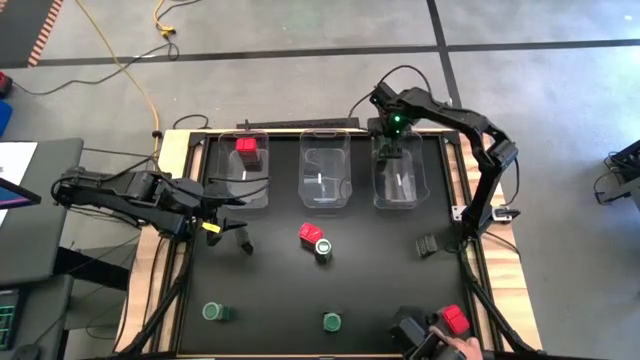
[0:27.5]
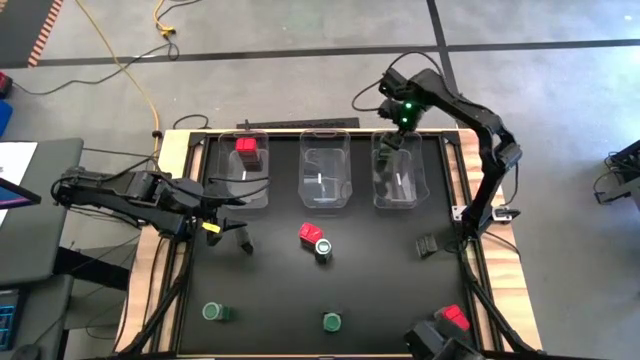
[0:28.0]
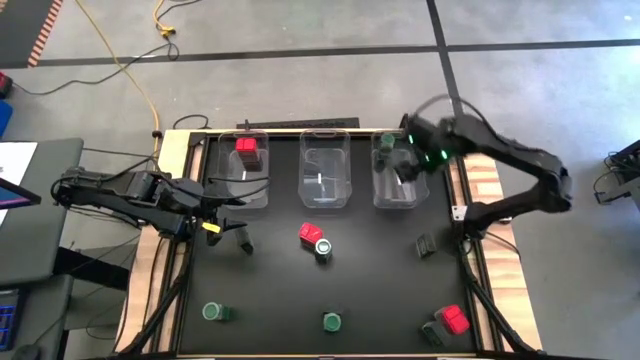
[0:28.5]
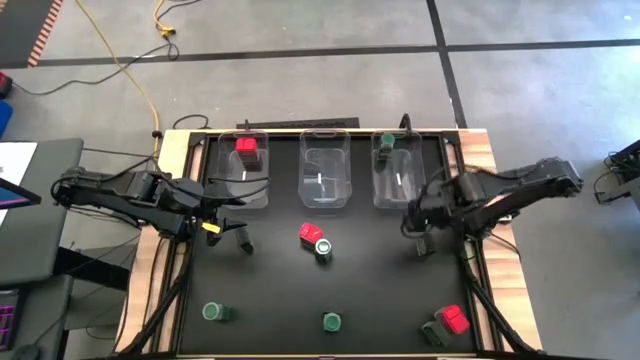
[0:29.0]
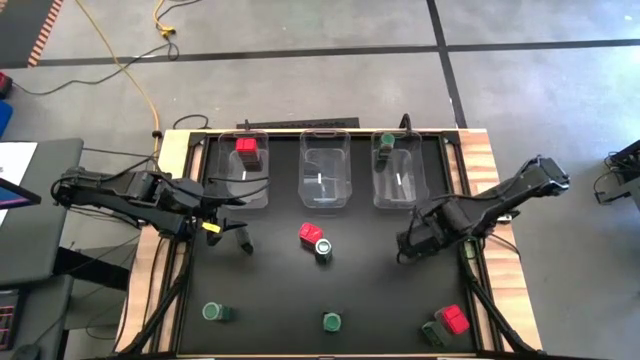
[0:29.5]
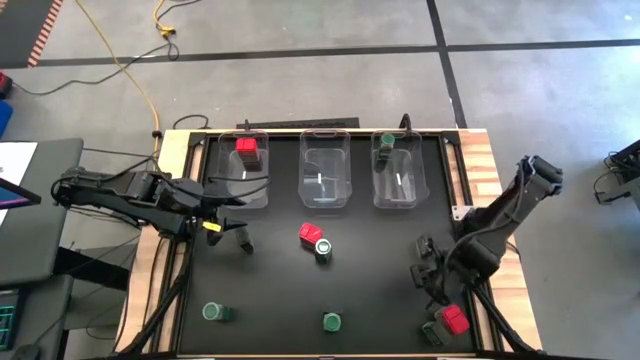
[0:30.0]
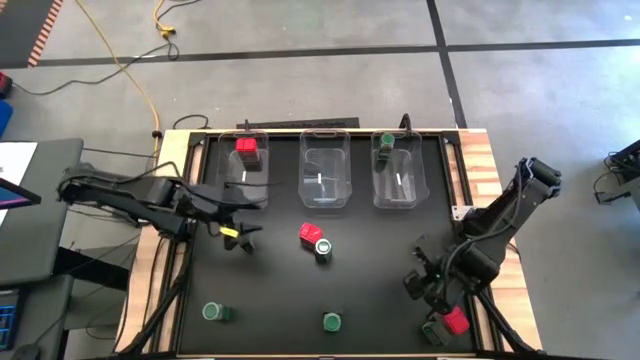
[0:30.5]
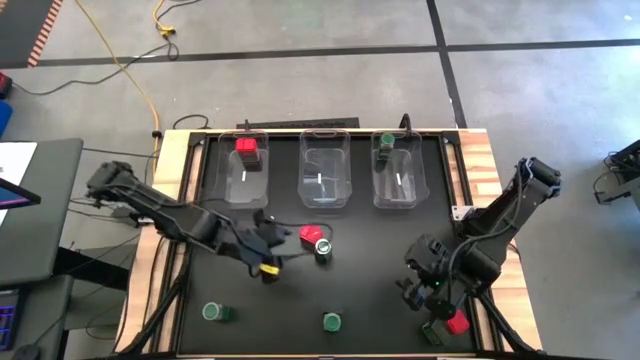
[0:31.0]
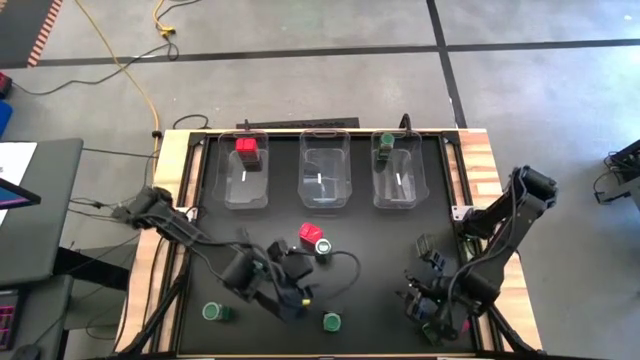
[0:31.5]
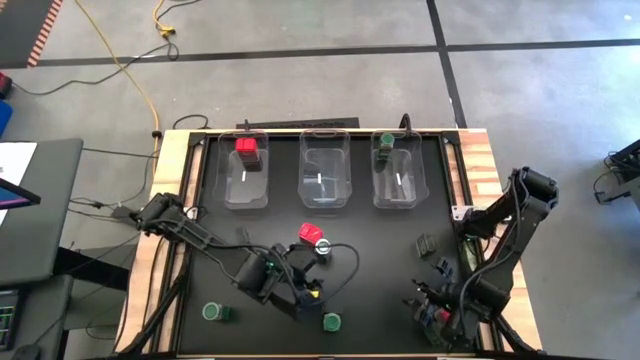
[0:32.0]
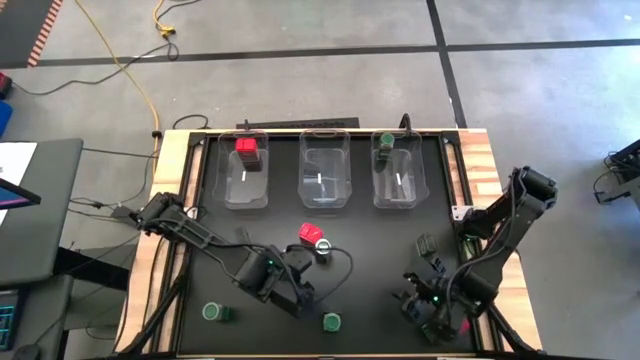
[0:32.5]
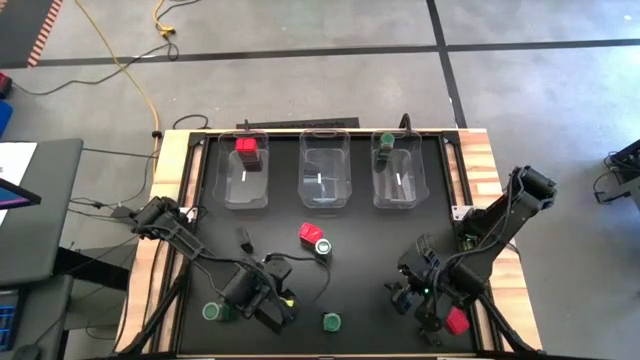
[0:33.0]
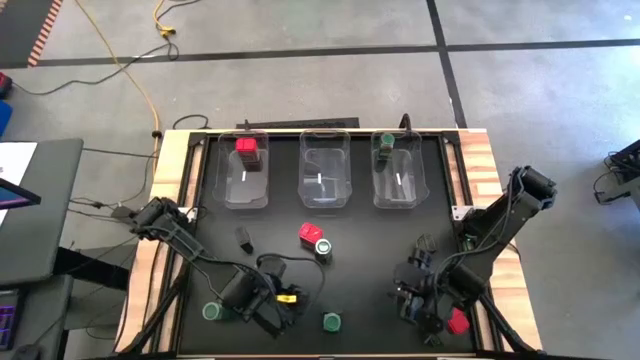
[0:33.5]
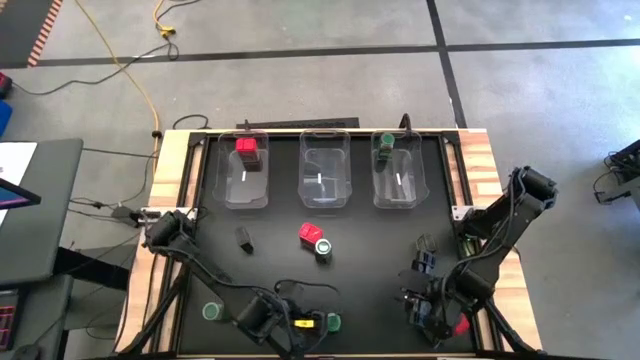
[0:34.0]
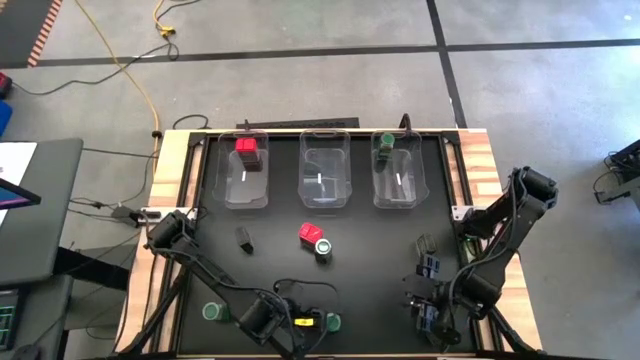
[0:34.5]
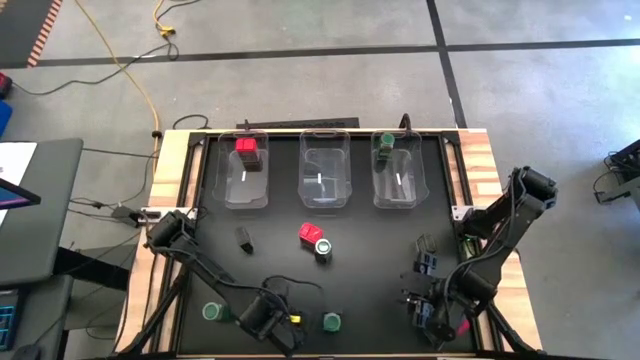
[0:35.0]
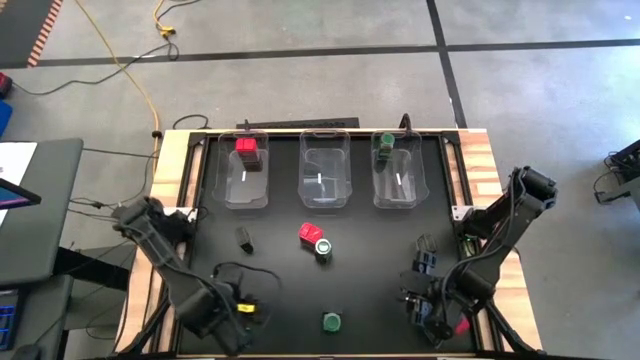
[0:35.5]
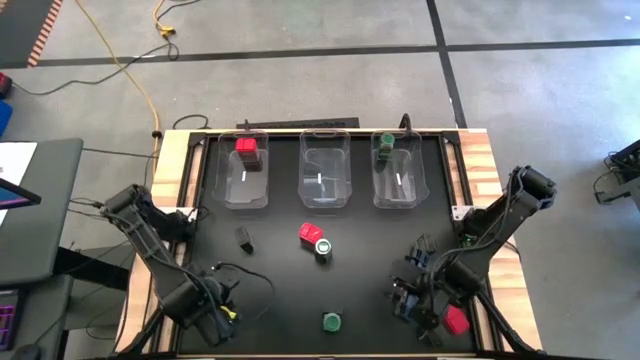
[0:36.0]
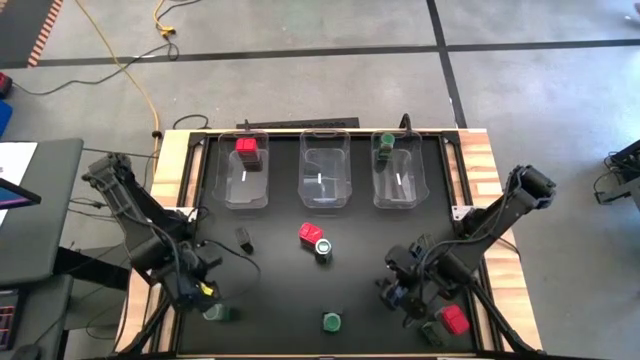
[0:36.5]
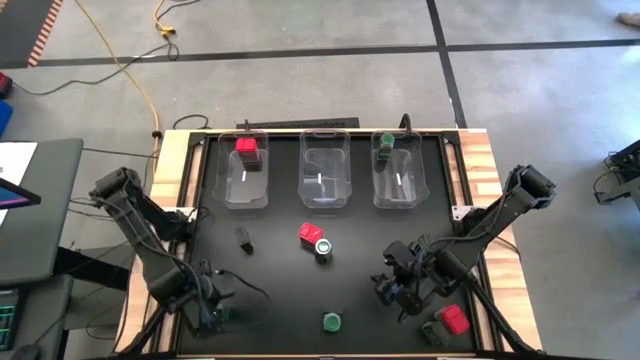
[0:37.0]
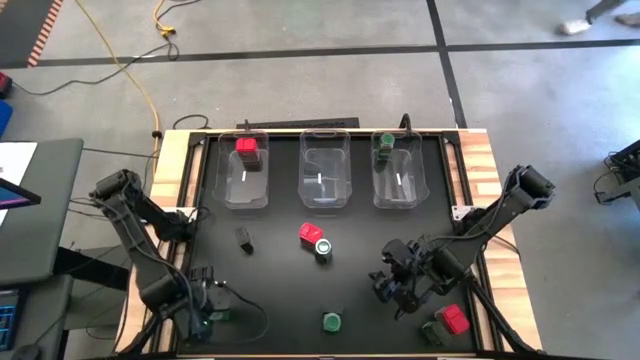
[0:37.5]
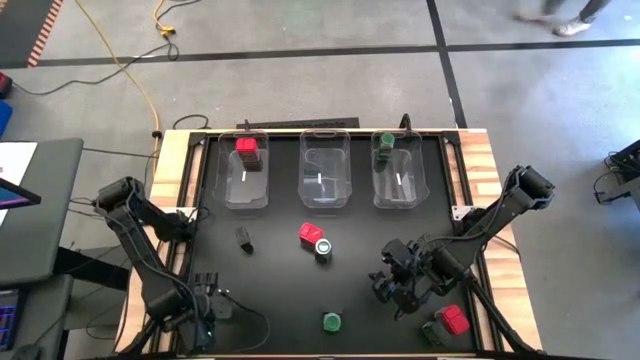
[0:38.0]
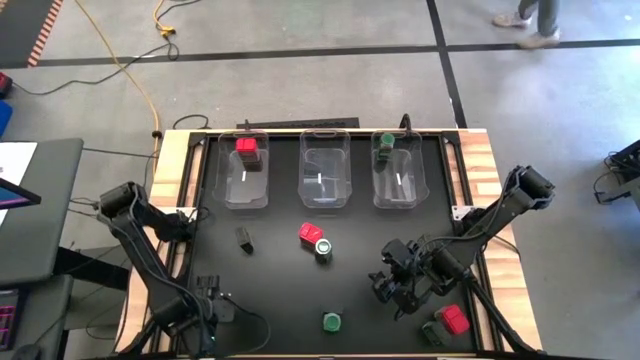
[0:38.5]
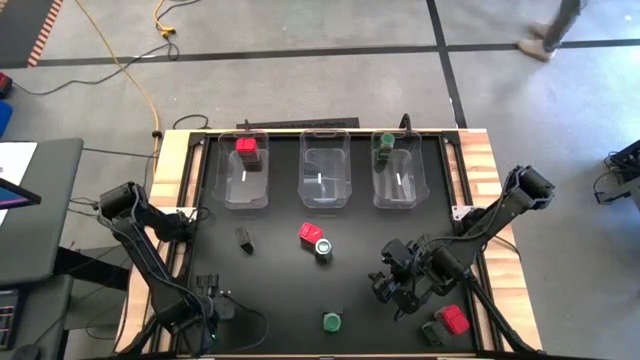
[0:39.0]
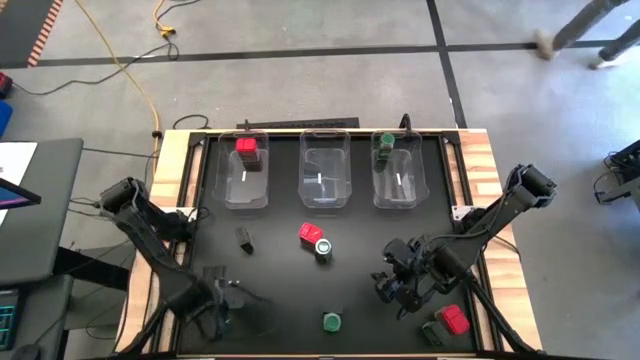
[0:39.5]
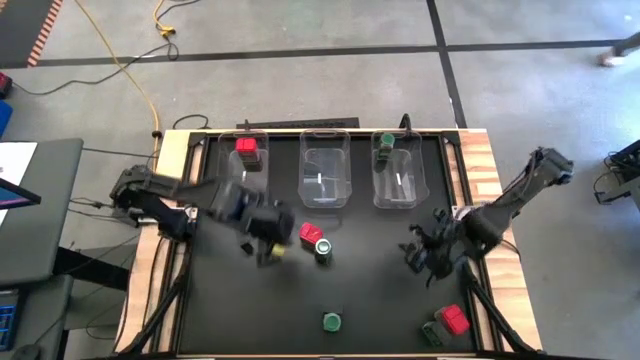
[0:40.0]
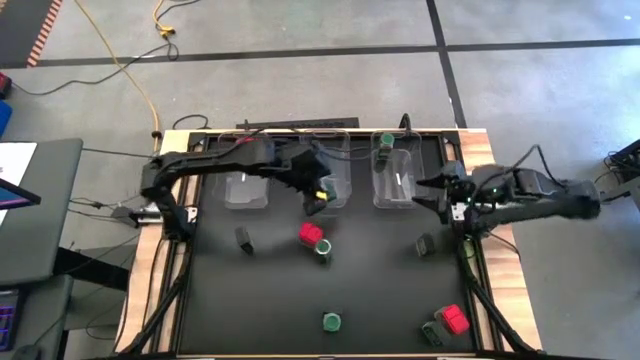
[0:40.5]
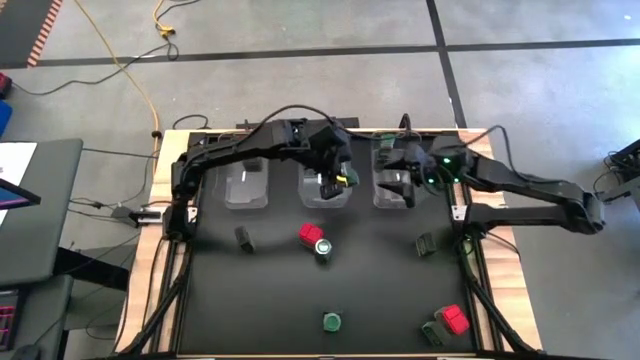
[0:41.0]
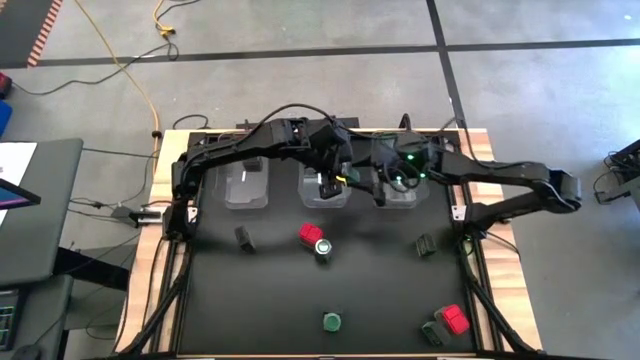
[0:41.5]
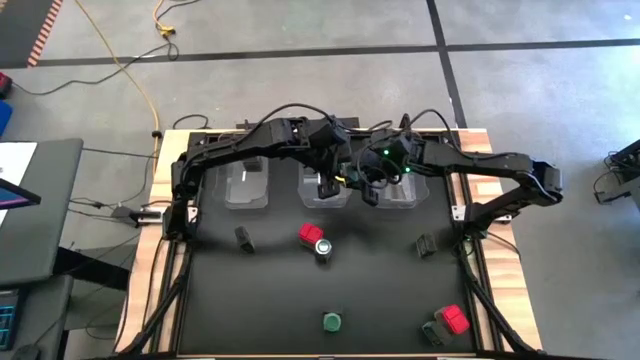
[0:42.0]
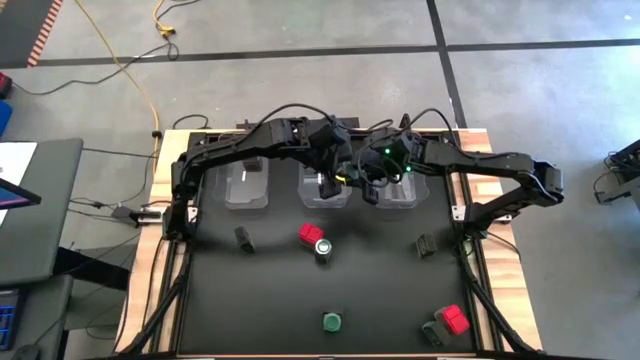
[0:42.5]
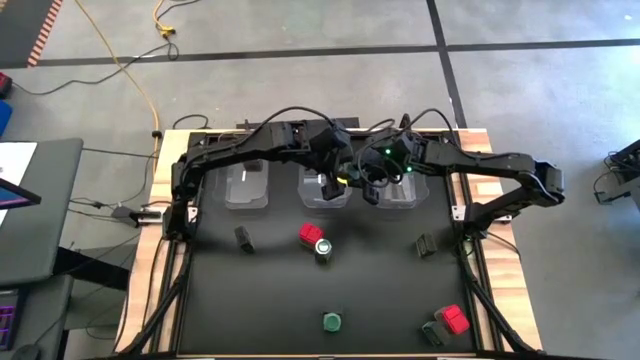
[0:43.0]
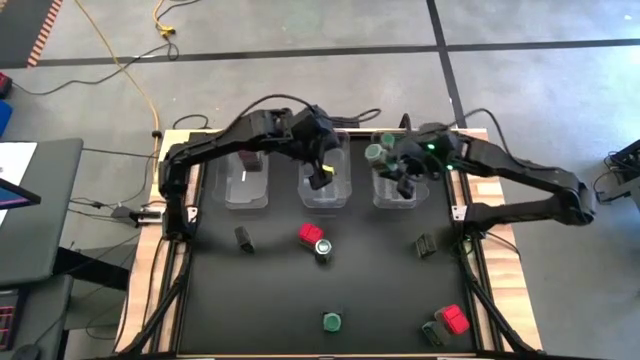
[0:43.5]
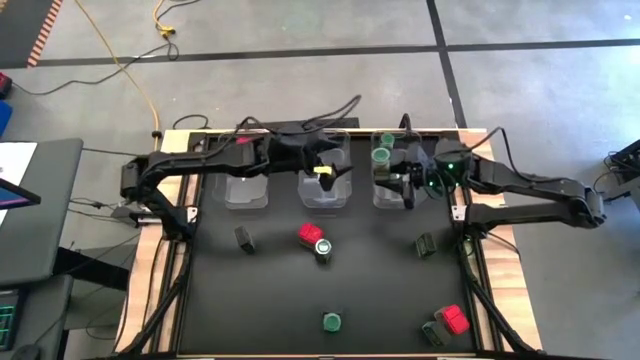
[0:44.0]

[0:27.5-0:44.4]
Task: Sort spices by type
Put the green seasoning bottle into the right transparent bin

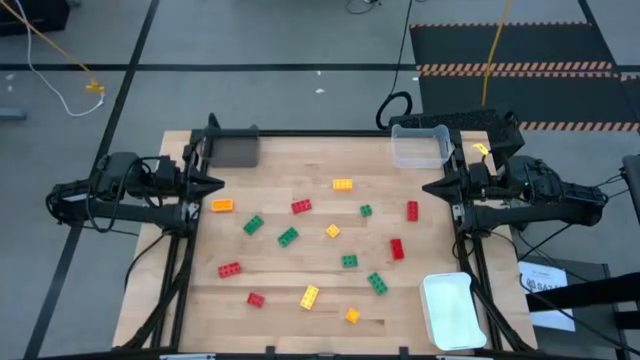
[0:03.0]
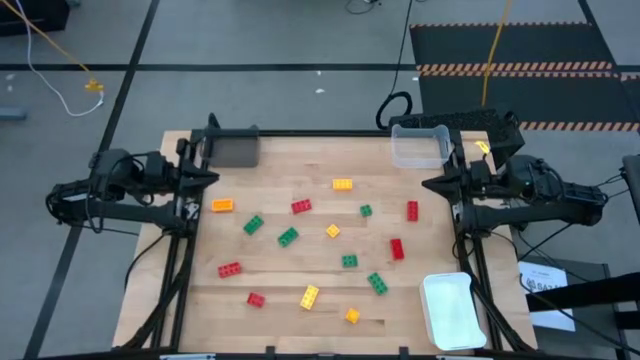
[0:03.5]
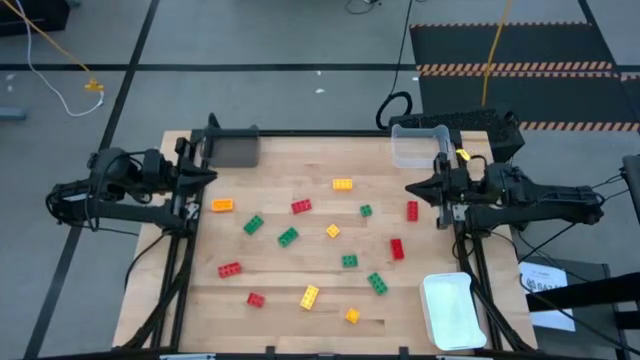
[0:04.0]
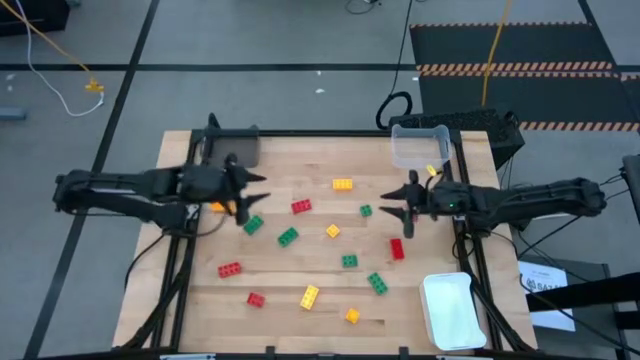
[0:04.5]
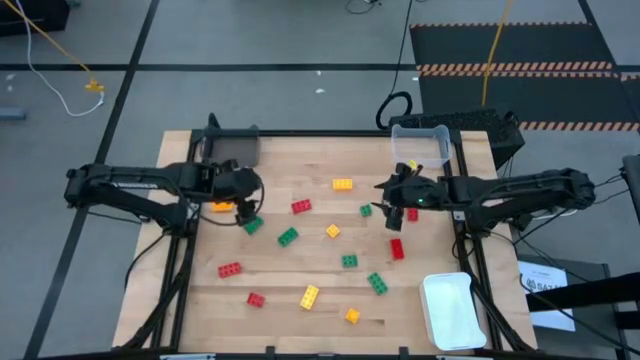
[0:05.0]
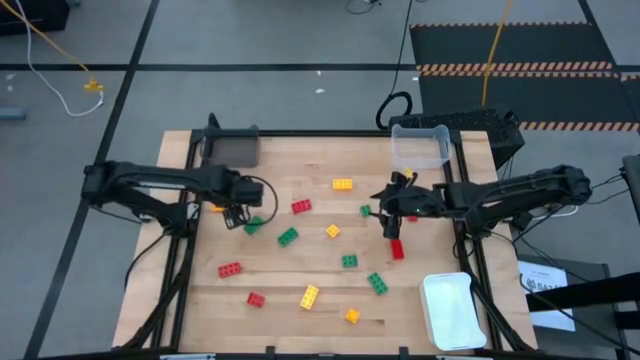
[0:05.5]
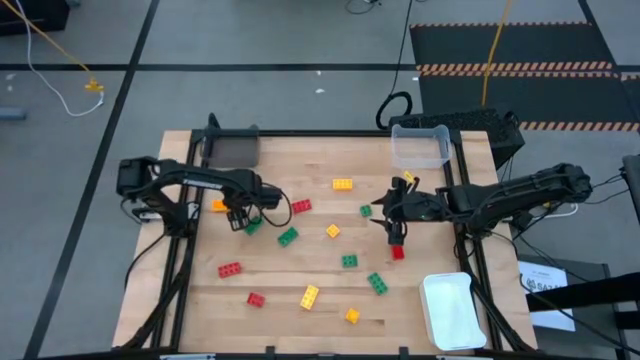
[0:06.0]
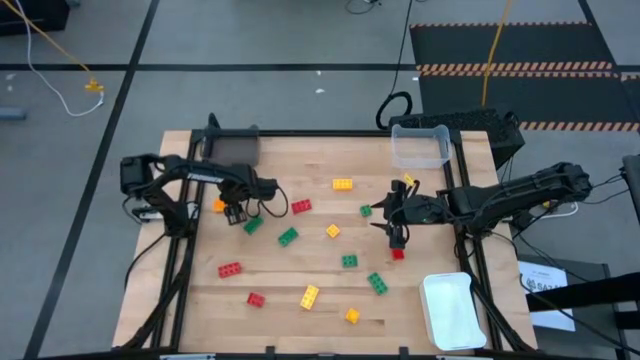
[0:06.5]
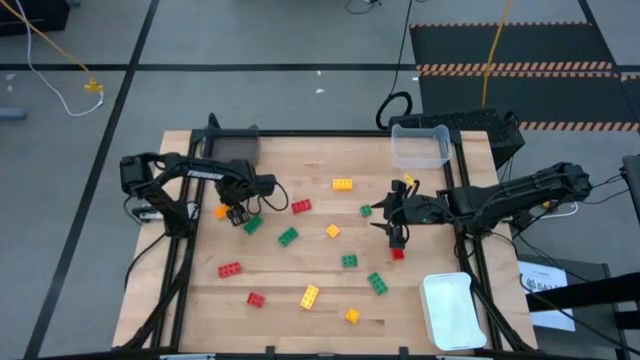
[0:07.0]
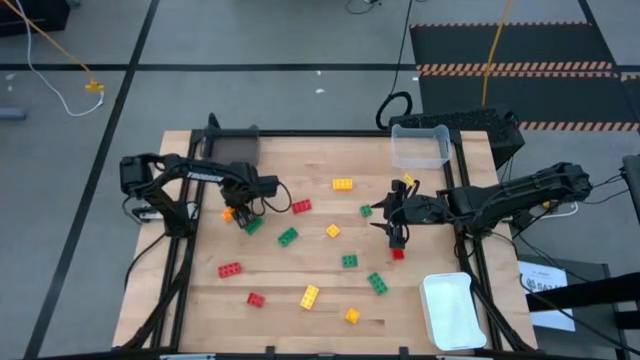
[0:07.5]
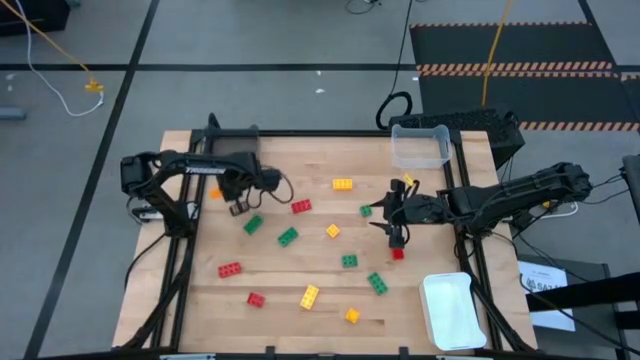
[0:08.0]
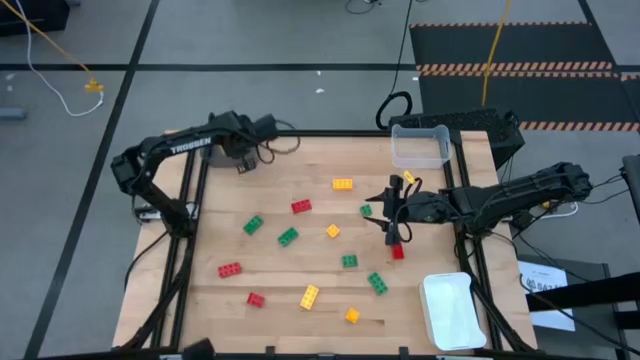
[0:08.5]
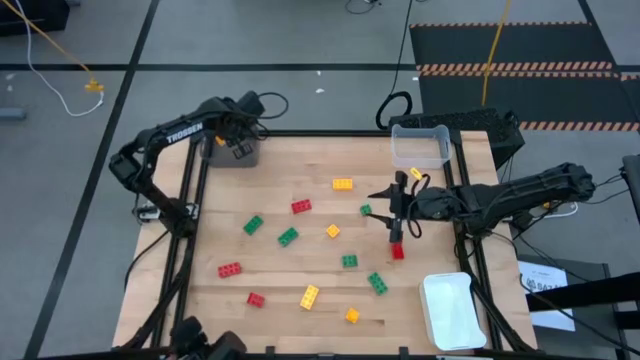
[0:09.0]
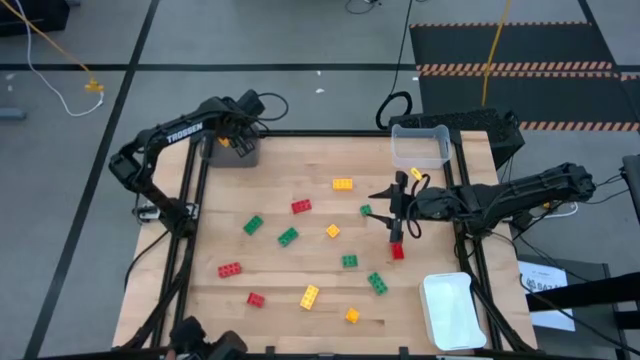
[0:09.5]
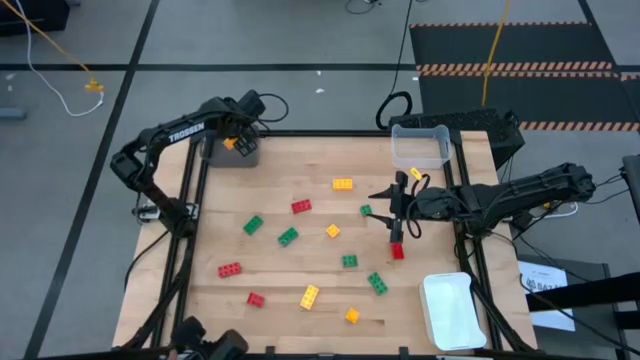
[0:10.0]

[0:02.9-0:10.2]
Task: Sort & place blocks by color
Put the yellow gamepiece into the black bin
